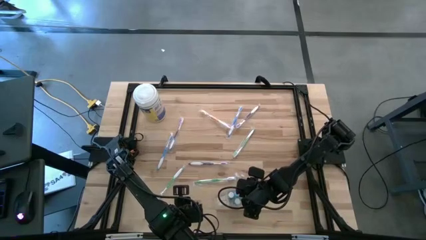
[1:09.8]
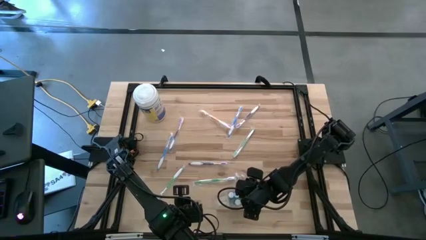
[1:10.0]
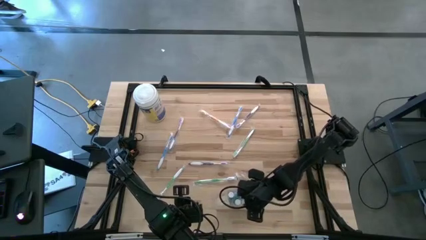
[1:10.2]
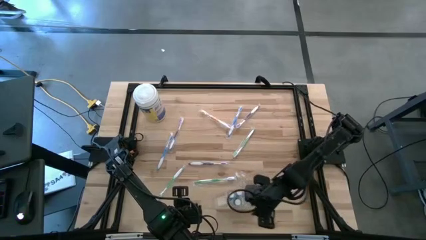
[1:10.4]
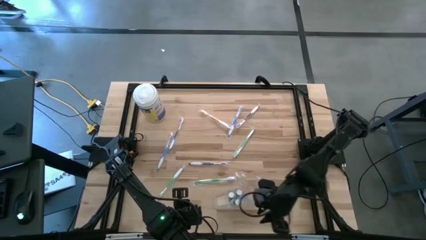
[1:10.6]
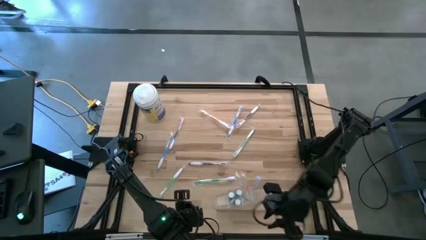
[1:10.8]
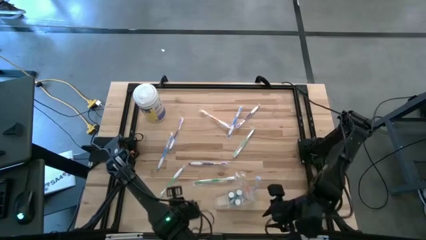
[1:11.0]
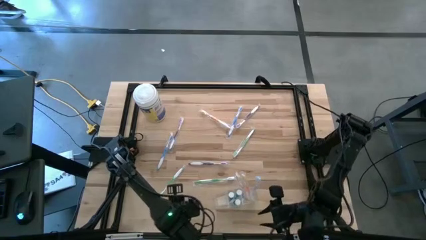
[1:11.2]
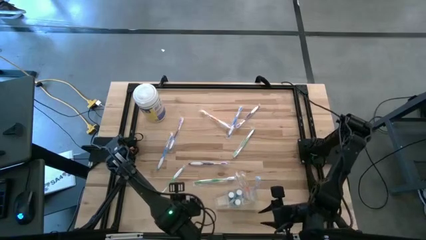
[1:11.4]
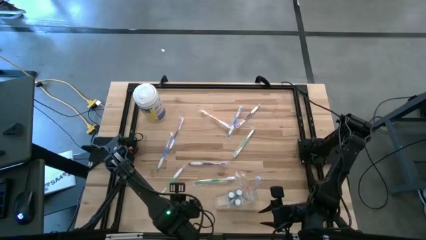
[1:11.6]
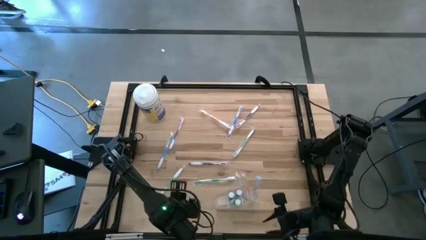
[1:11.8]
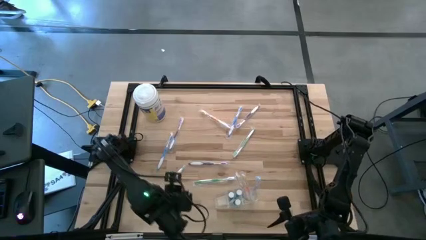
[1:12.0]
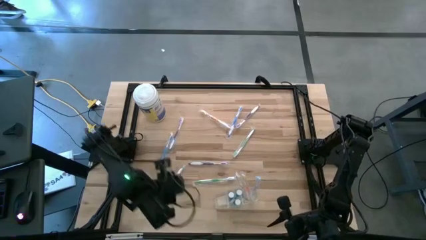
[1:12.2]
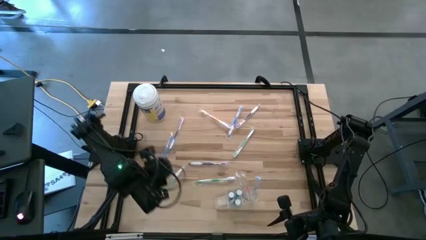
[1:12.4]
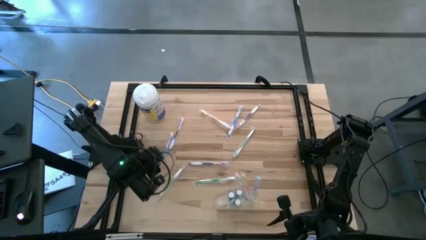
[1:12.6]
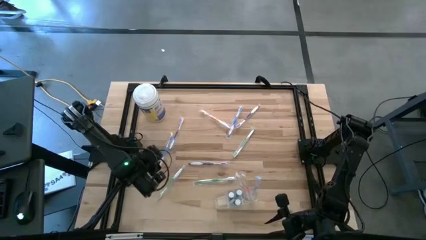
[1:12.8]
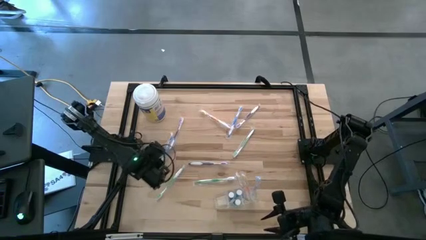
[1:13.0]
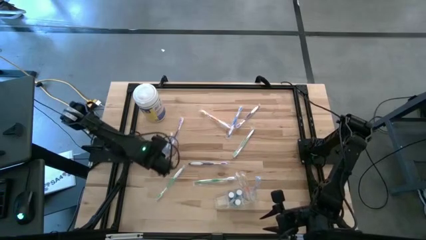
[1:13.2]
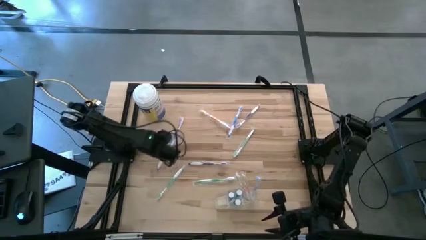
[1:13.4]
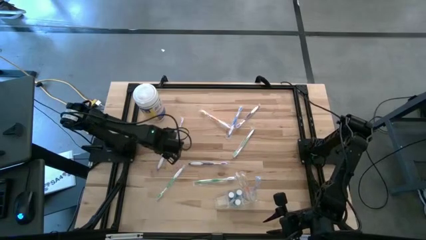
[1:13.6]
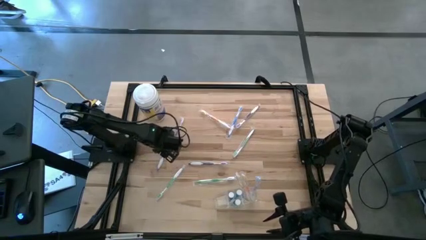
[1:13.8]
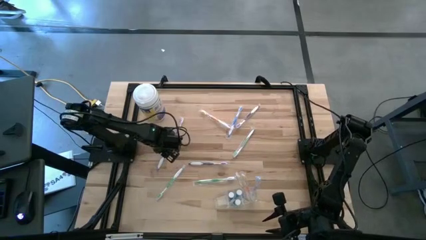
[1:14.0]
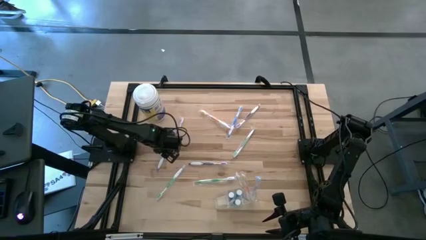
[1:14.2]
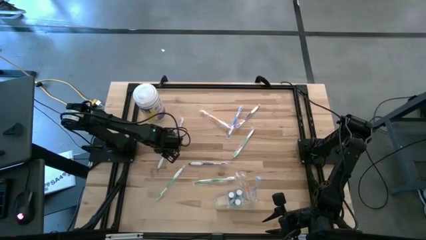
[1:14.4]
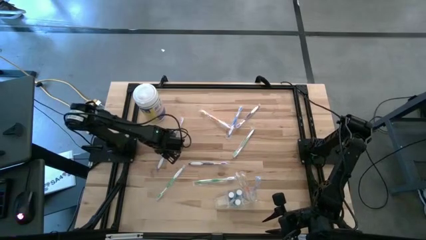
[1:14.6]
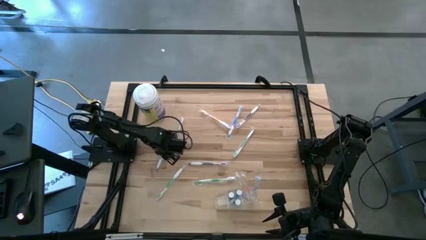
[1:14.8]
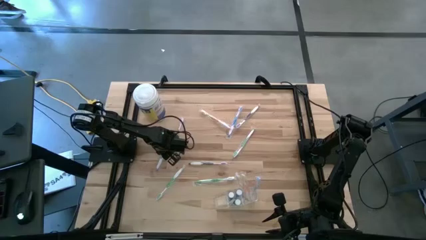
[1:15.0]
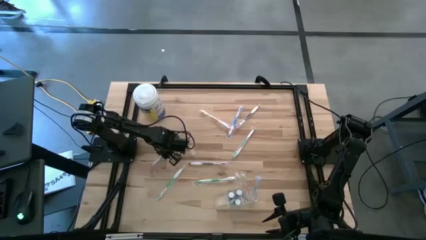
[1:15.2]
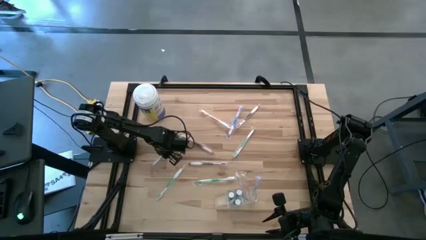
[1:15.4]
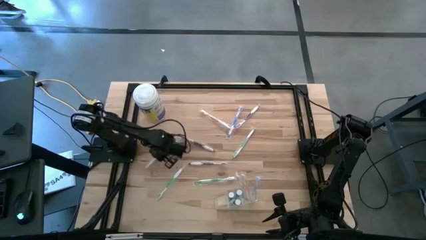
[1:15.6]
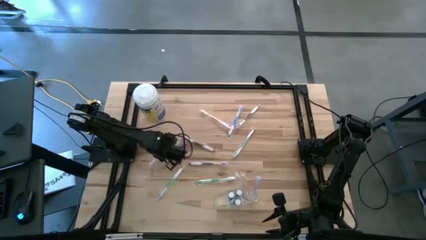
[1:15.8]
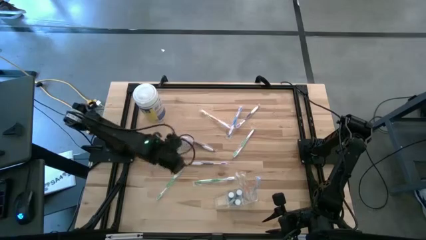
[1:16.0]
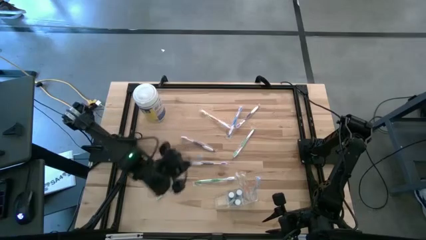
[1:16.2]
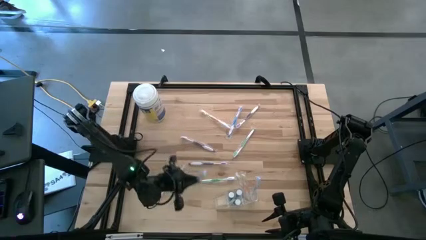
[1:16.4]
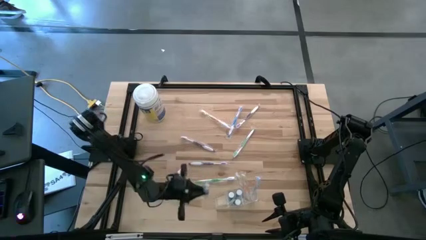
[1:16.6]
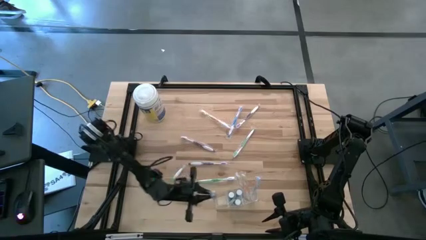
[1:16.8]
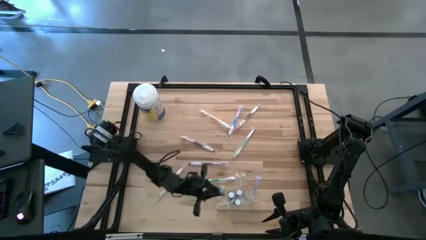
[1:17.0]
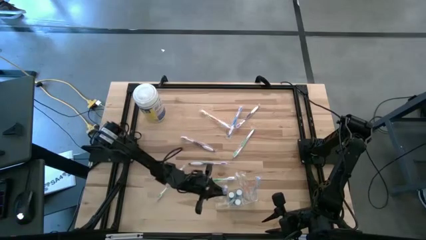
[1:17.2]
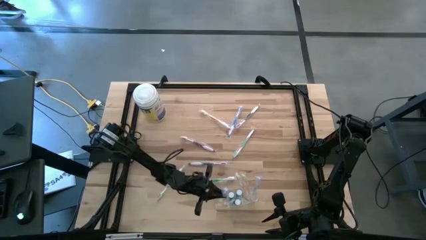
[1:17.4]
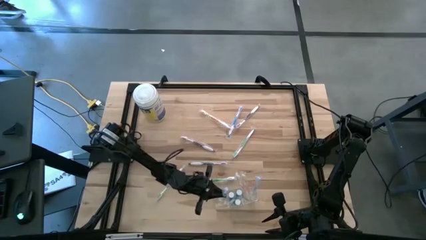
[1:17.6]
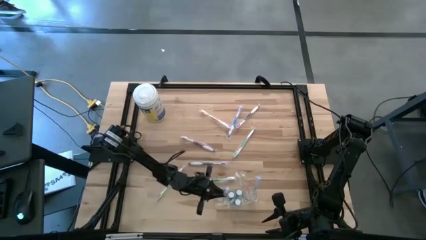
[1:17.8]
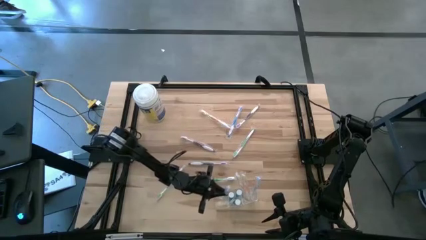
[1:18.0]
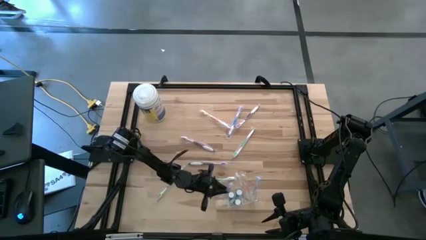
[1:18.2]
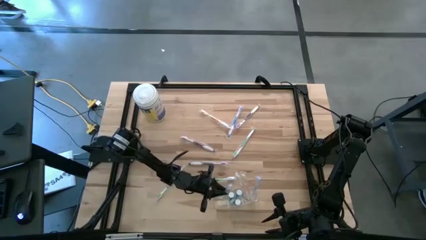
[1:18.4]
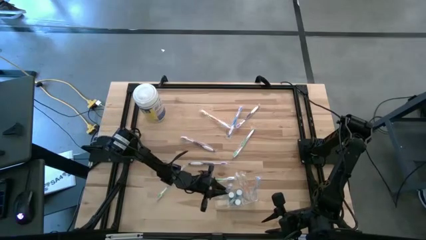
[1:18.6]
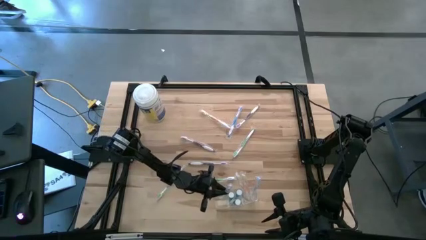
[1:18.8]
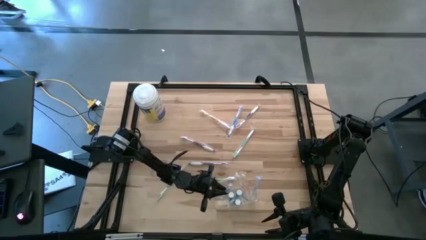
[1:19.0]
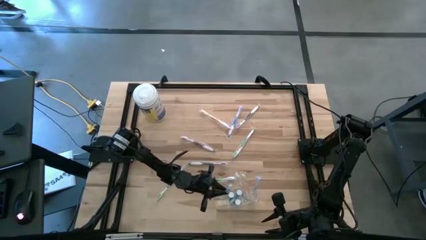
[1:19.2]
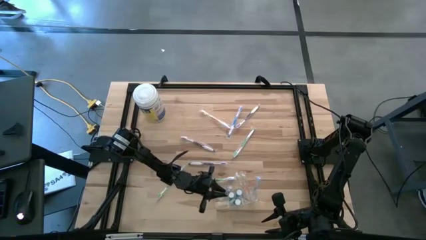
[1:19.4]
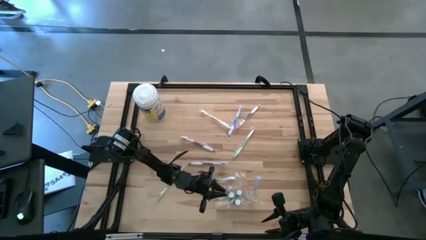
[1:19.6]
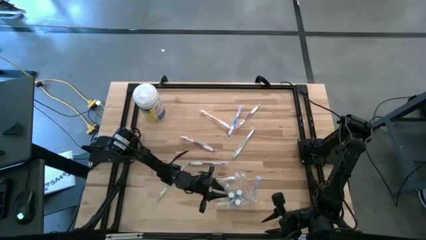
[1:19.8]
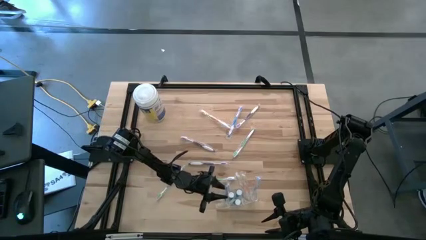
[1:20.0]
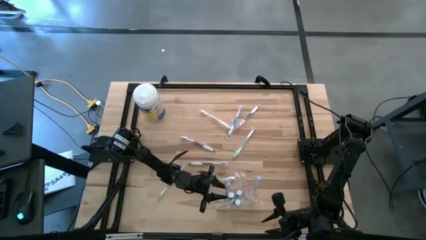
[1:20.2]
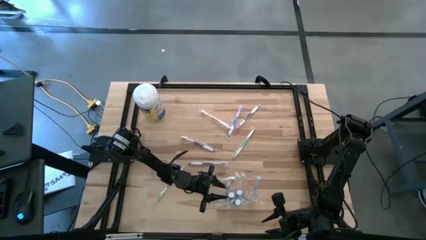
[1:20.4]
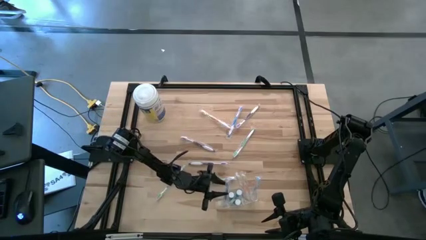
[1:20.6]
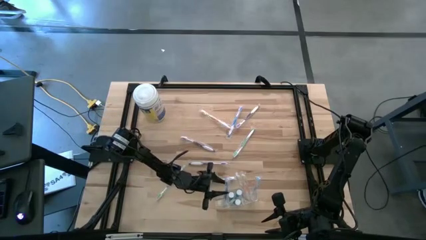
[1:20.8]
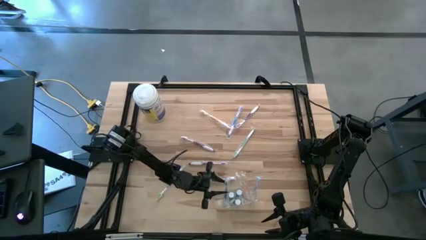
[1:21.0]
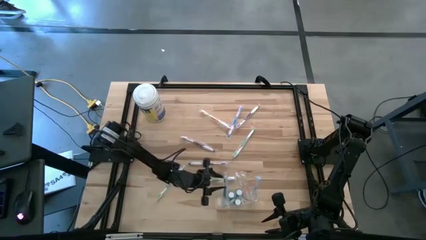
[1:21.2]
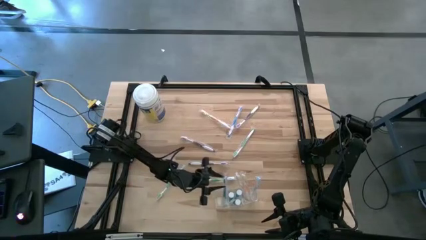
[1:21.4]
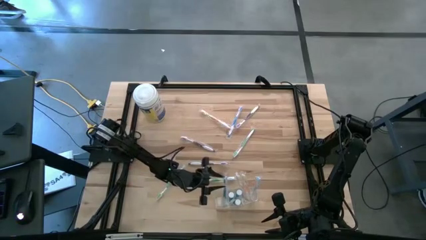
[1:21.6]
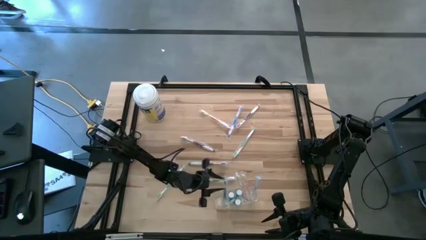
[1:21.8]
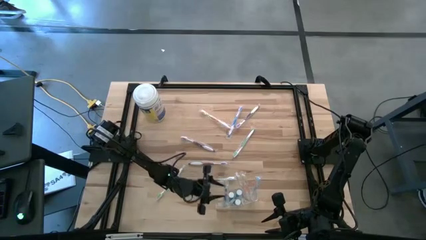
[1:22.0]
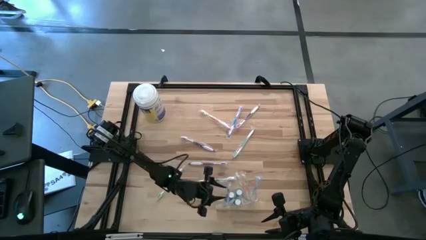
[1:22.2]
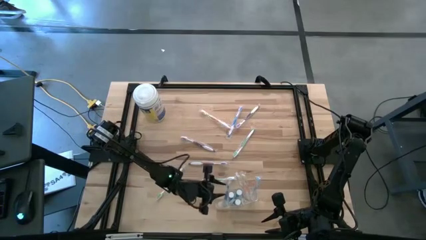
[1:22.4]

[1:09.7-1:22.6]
Task: Pick & Place toothbrushing station
Put the left blue toothbrush into the transparent bin
